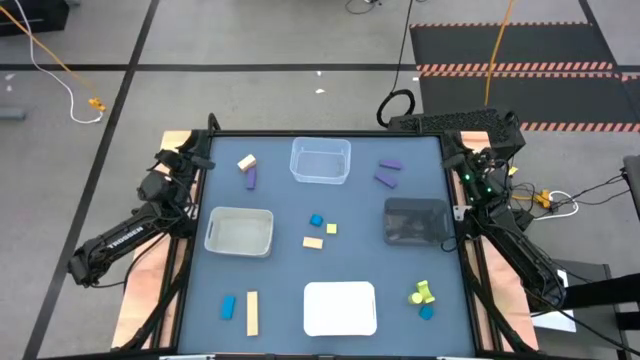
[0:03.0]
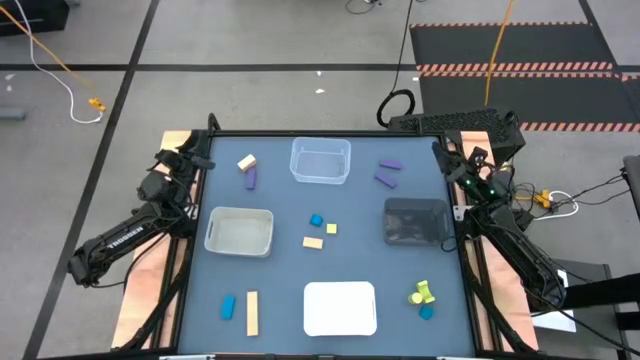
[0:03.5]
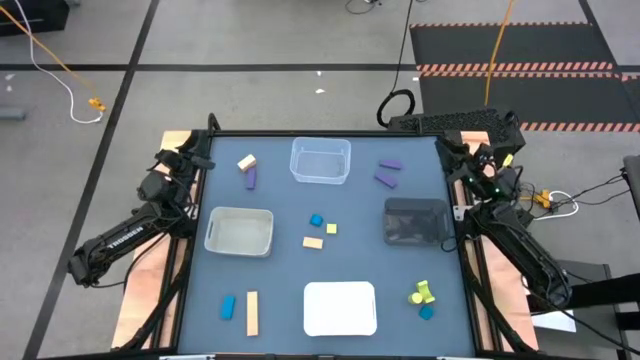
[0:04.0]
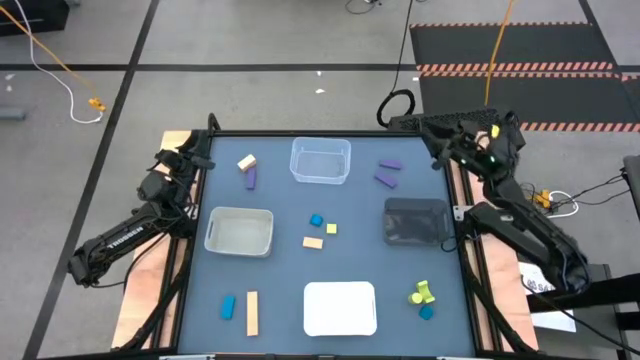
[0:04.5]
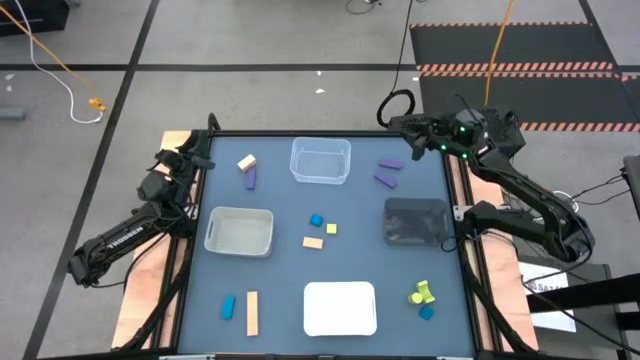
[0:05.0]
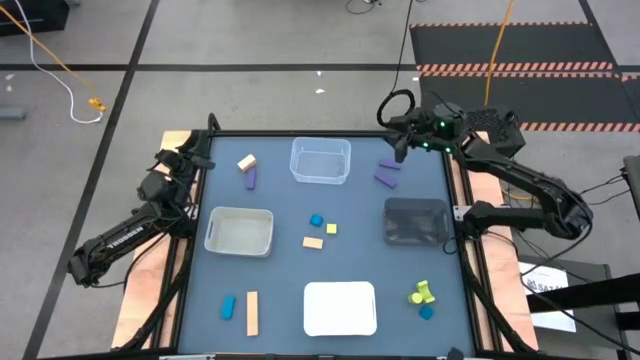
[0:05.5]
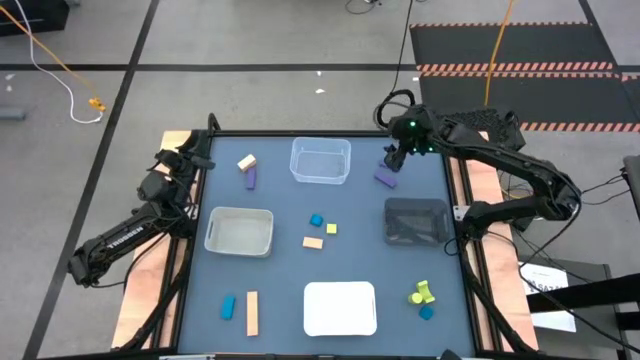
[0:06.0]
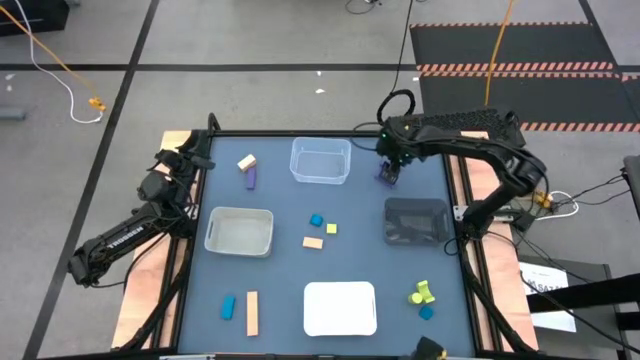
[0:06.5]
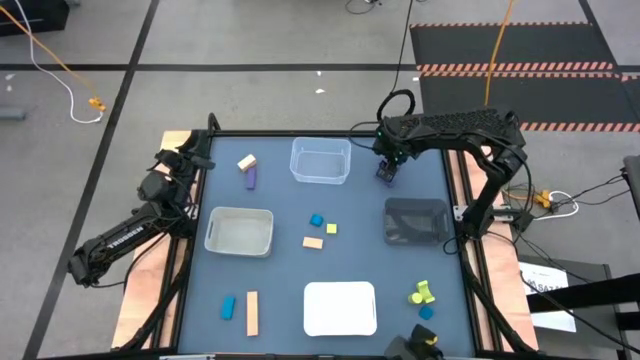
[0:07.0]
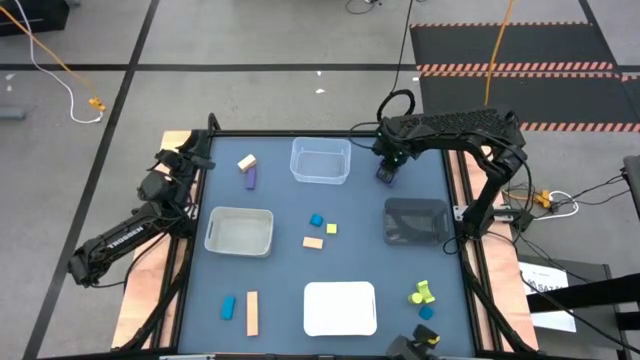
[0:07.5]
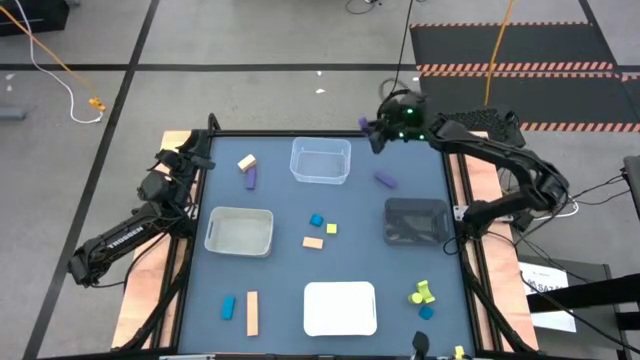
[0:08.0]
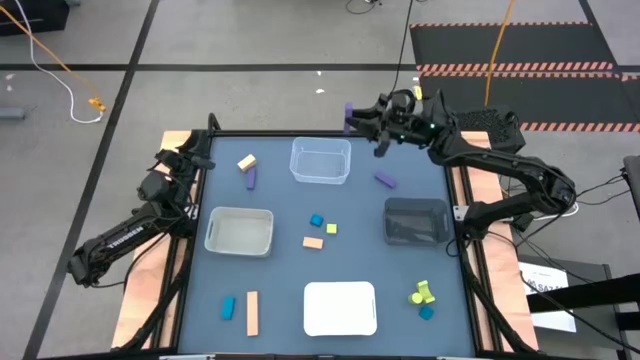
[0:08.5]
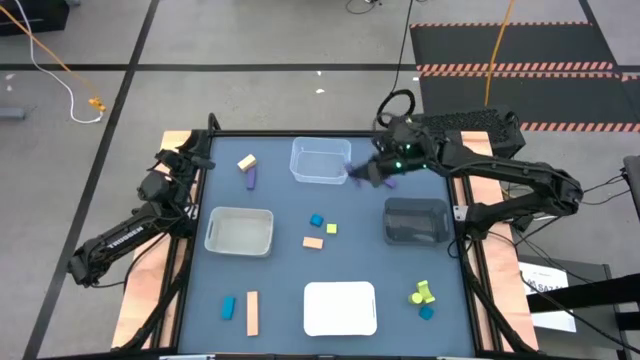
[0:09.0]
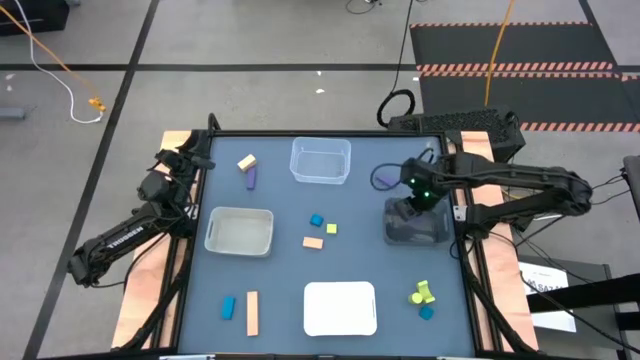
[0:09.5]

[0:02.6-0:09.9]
Task: Sort & place blocks by color
Put the violet block into the black bin

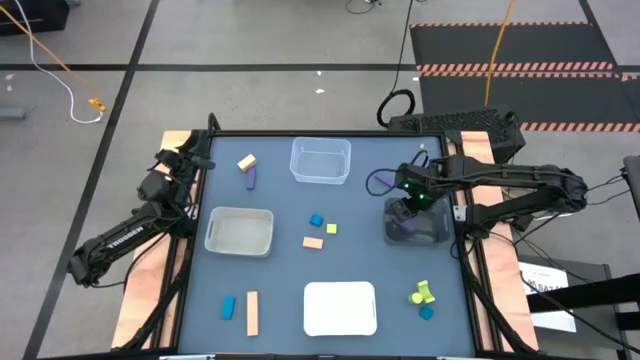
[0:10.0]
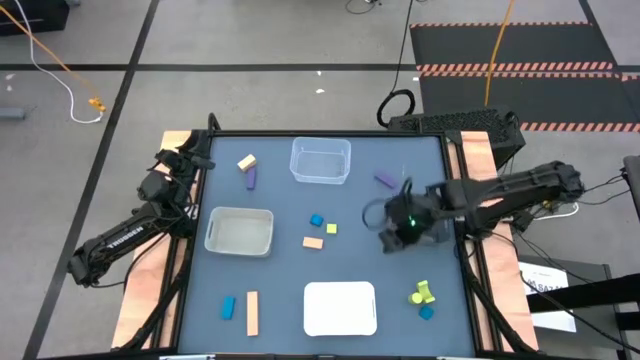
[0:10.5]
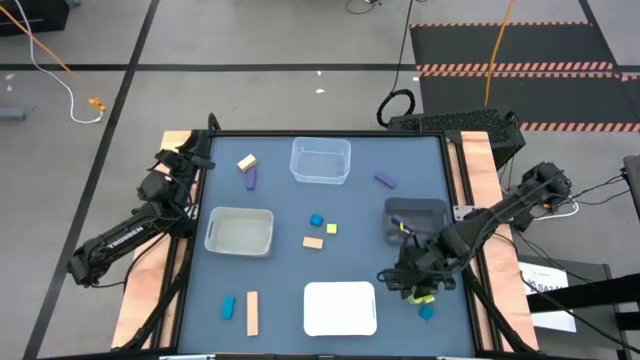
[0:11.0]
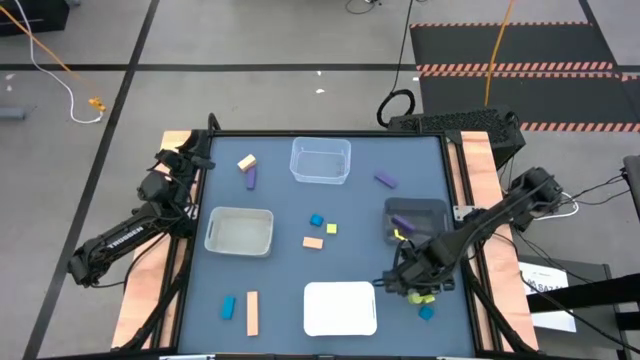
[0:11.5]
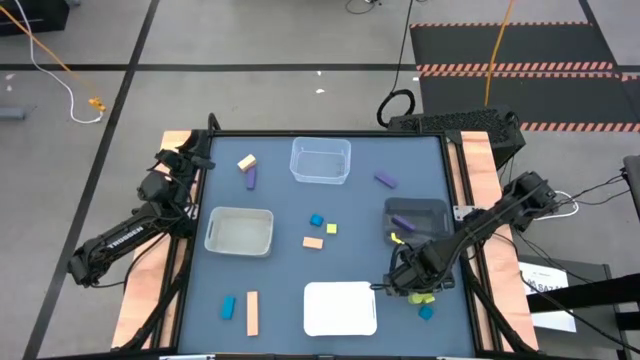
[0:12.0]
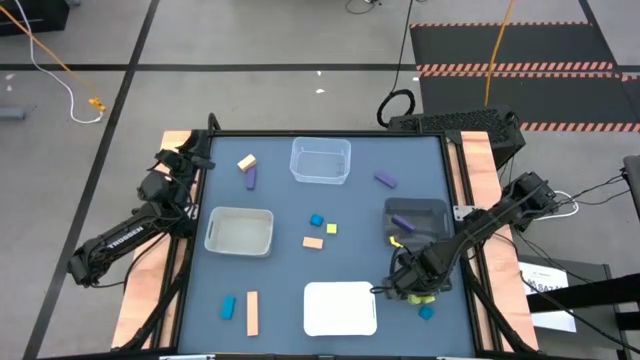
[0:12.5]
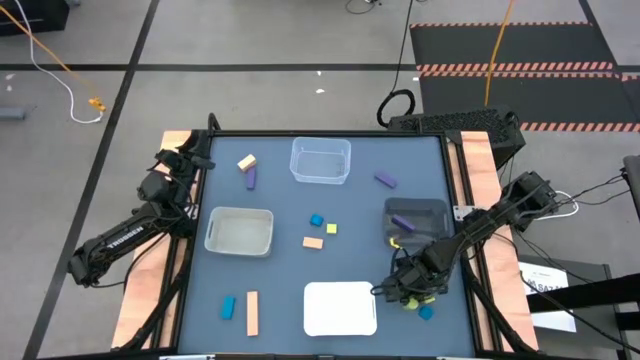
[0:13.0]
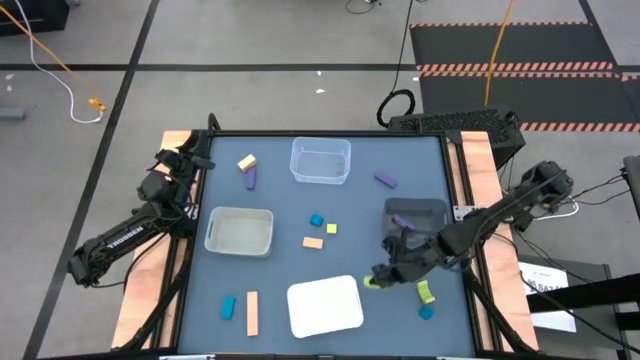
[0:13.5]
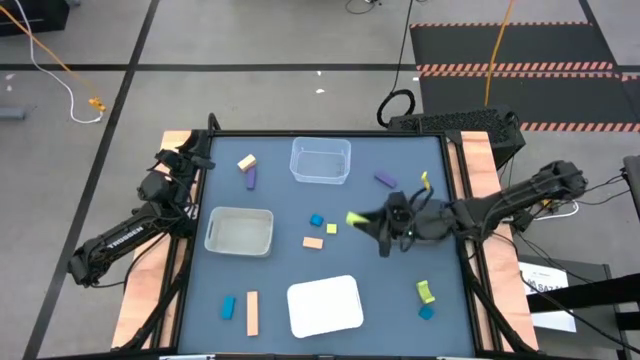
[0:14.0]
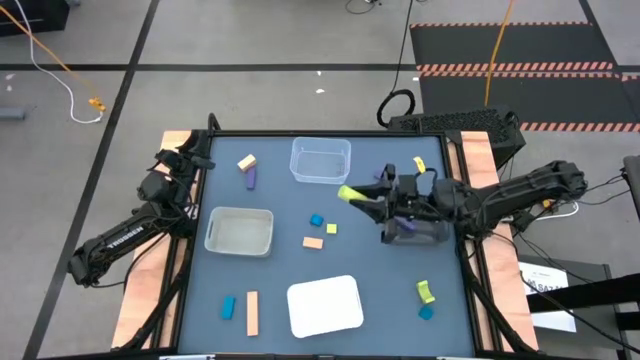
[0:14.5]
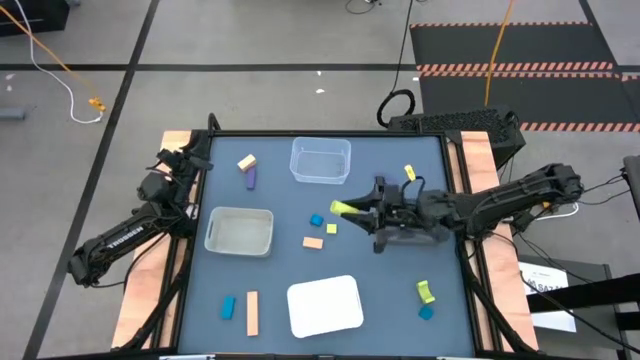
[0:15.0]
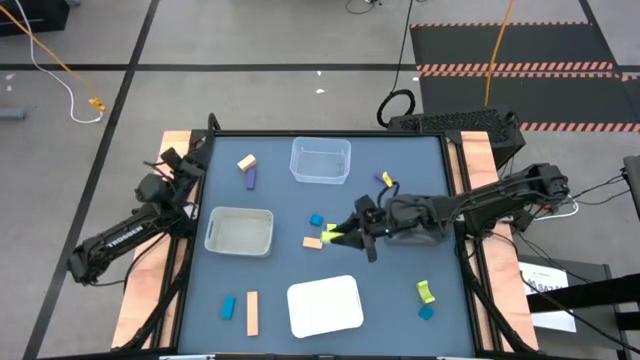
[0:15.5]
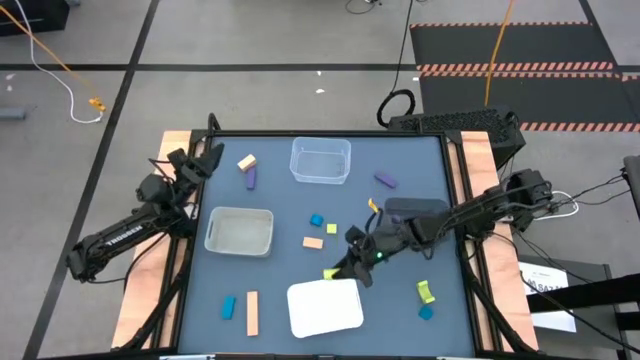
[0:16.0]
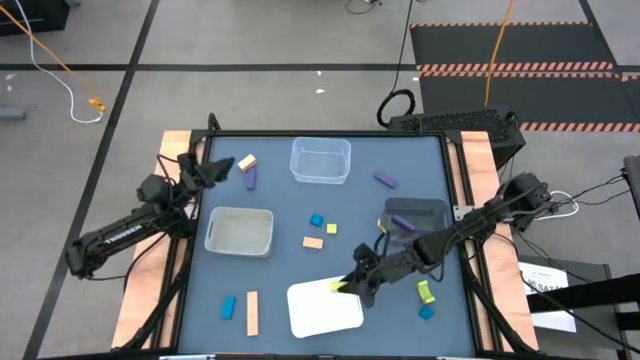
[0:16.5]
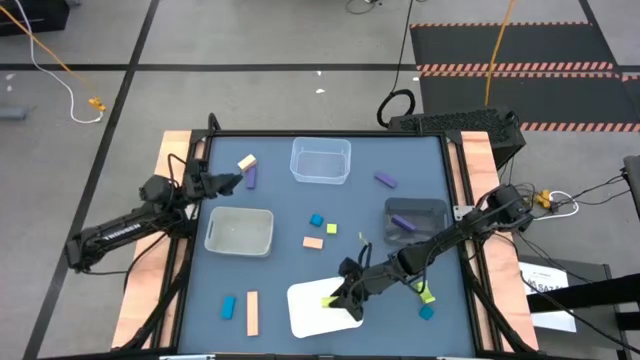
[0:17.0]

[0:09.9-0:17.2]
Put the green block into the white bin

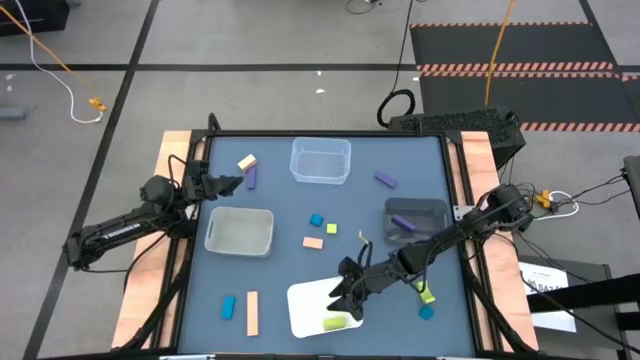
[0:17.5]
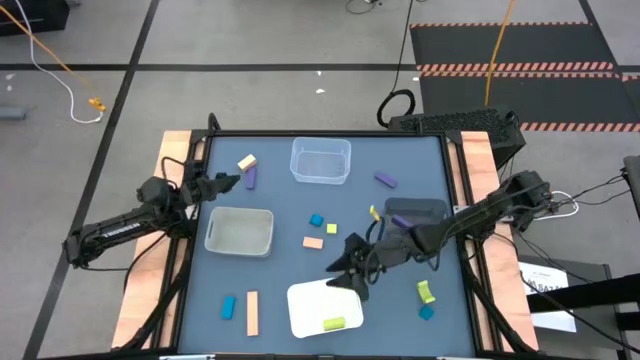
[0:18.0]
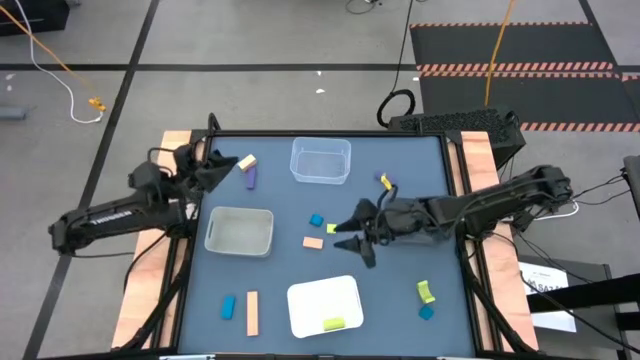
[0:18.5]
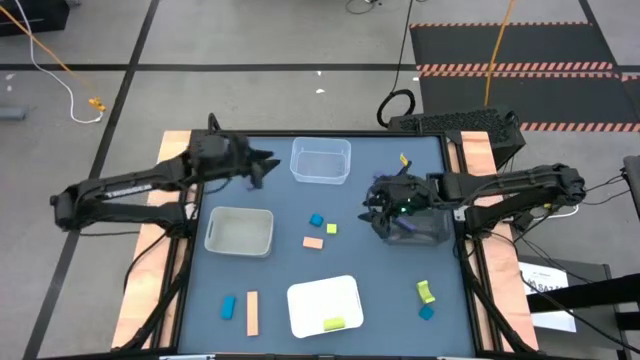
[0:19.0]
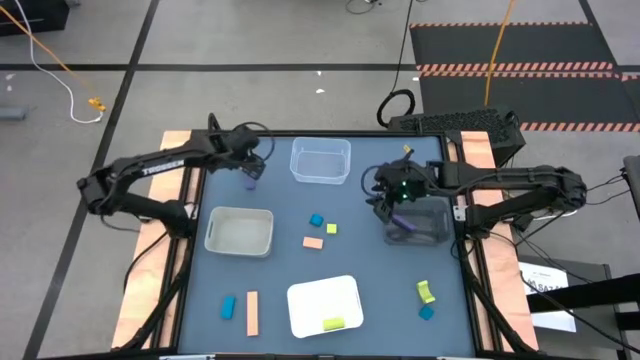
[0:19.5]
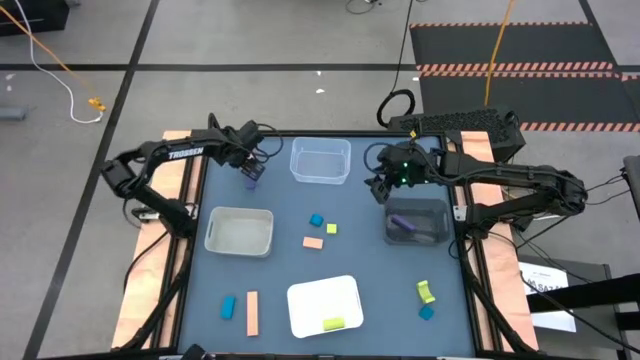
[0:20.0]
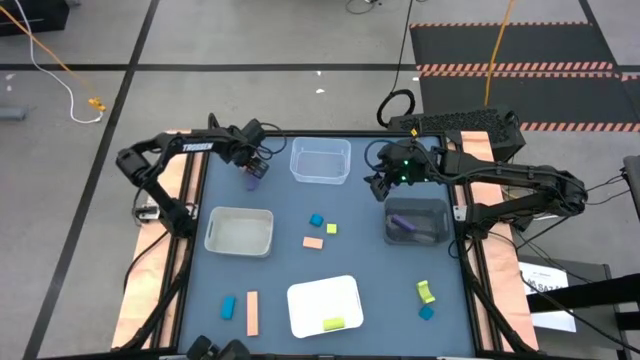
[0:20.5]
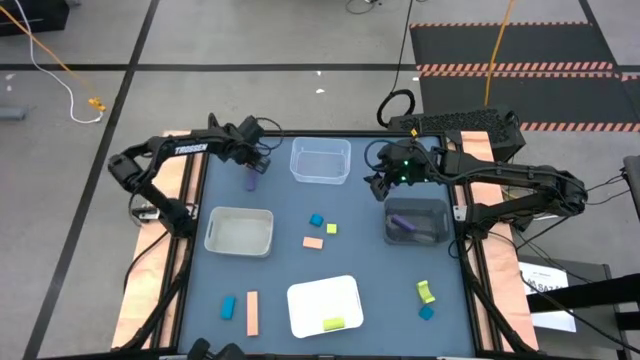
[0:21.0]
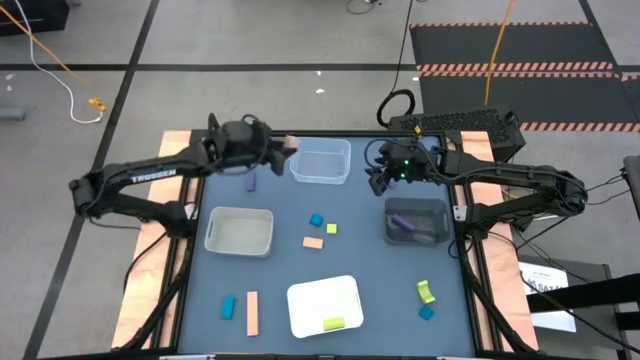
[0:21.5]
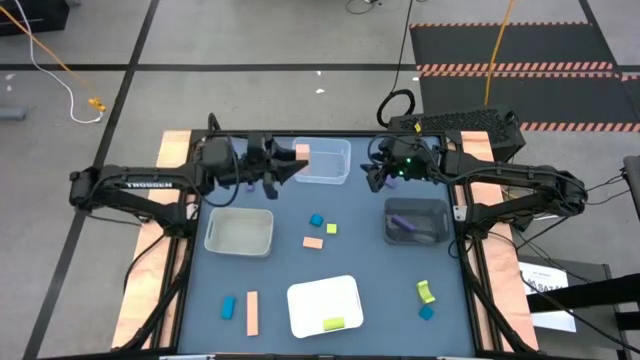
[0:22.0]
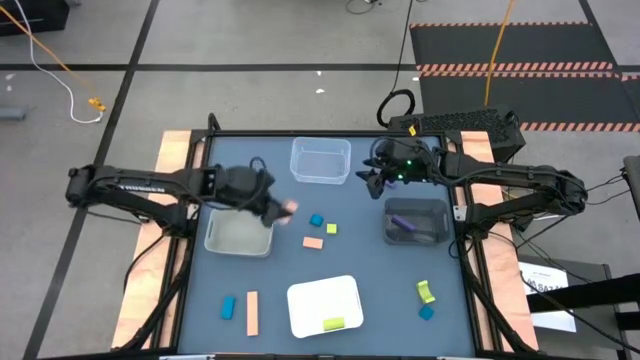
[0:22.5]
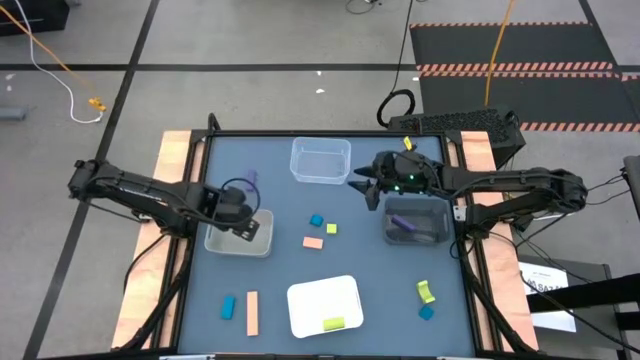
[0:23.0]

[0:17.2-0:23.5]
Put the wooden block into the gray bin

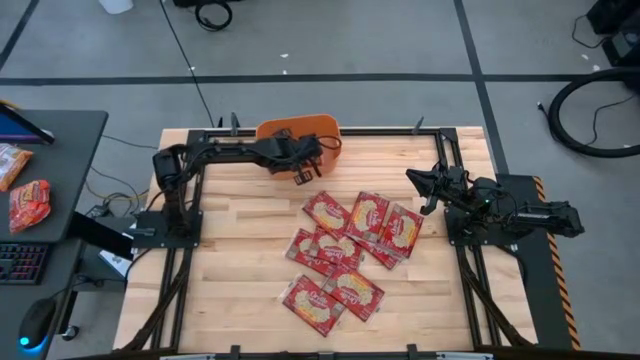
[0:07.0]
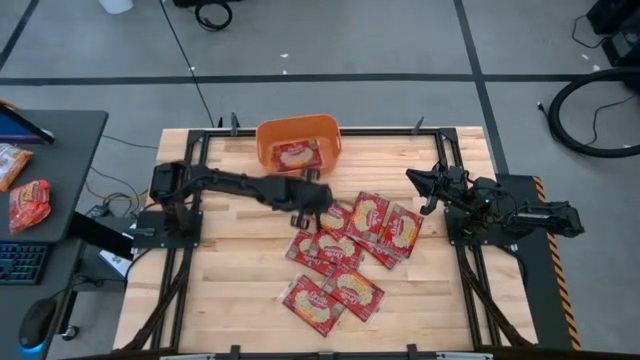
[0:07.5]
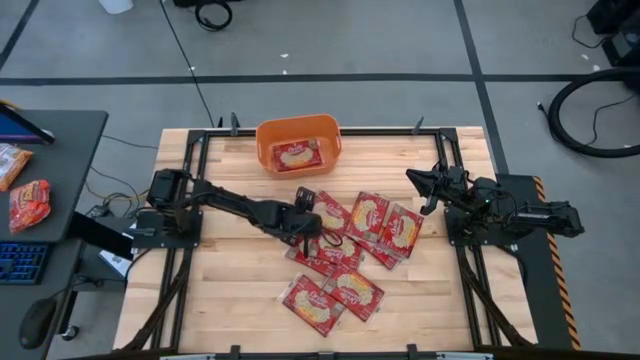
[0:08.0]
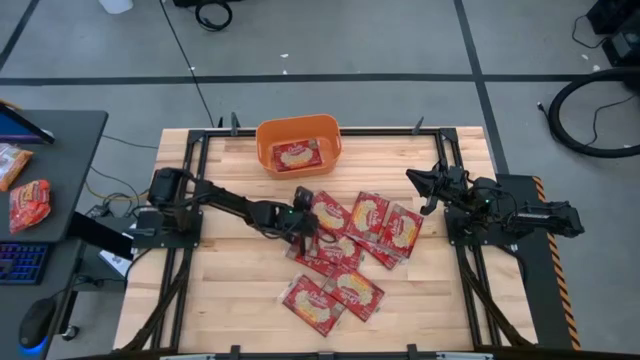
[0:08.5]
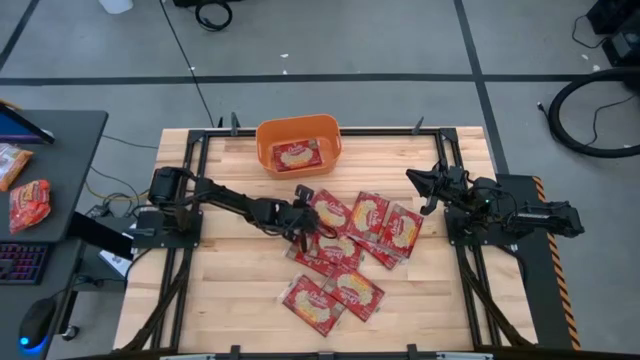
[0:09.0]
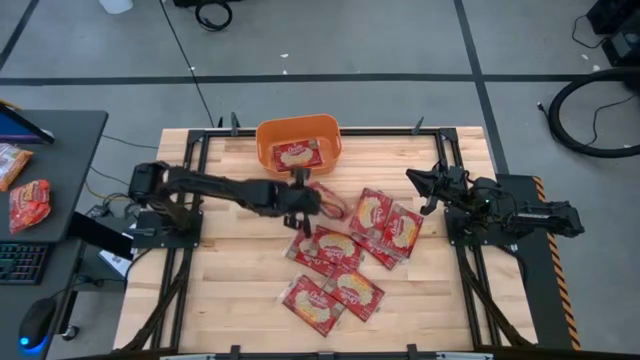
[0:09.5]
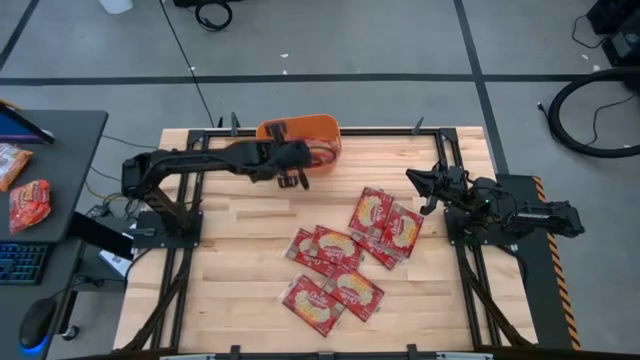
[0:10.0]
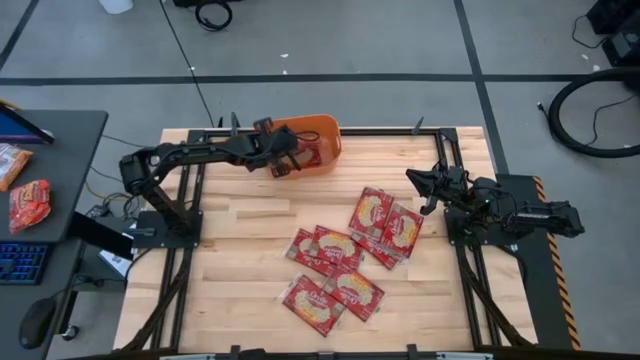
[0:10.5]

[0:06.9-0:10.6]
Task: Sort popcorn bags into baskets
Put the red popcorn bag into the orange bin
